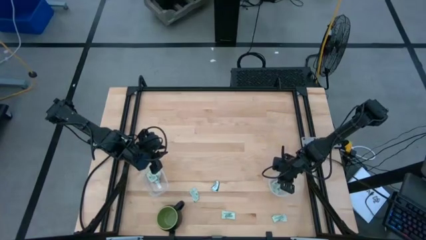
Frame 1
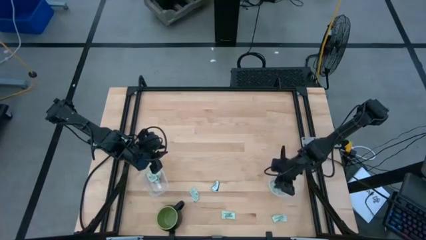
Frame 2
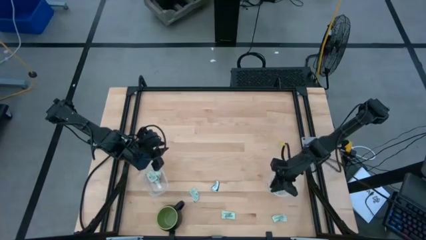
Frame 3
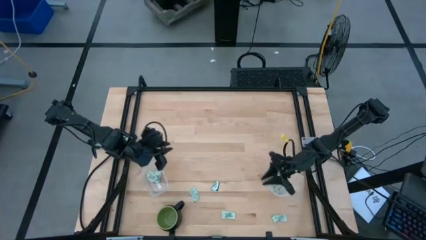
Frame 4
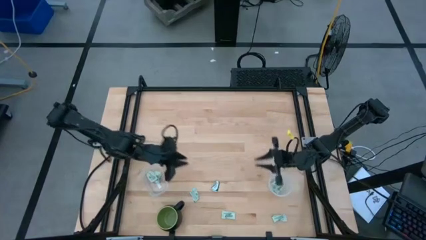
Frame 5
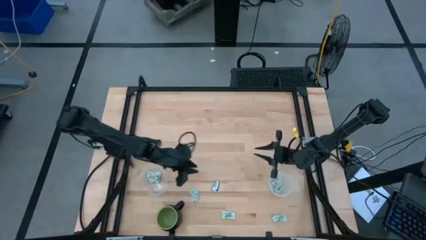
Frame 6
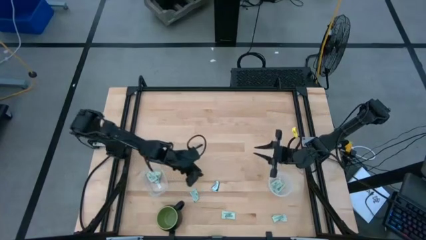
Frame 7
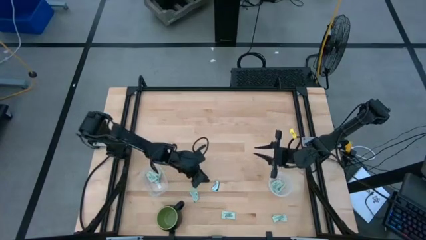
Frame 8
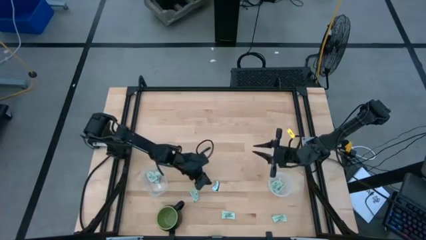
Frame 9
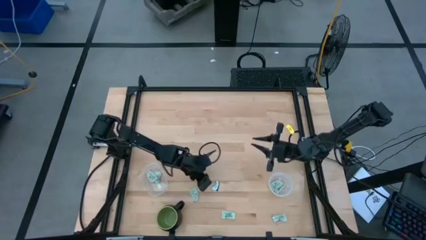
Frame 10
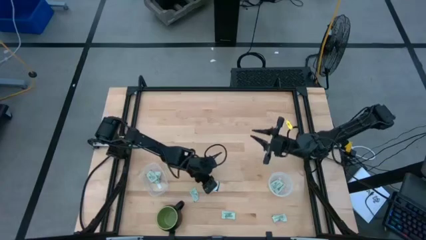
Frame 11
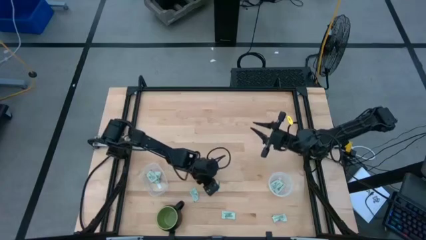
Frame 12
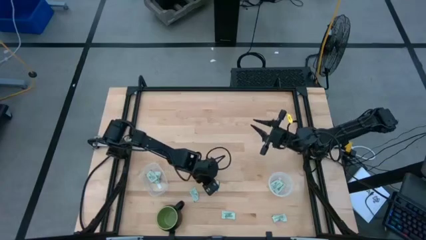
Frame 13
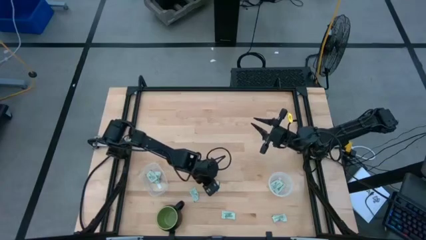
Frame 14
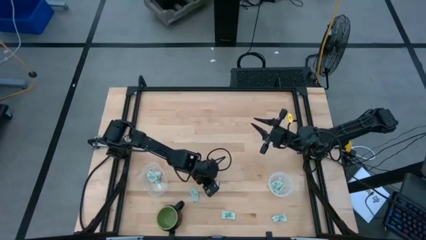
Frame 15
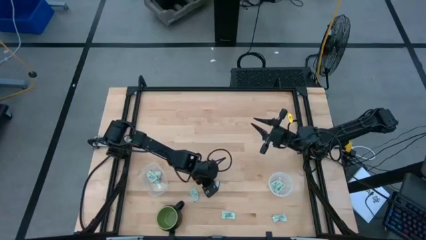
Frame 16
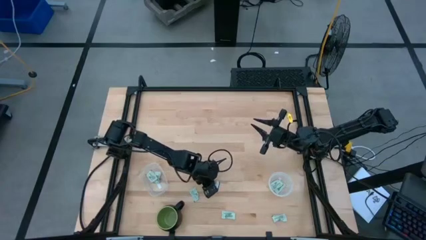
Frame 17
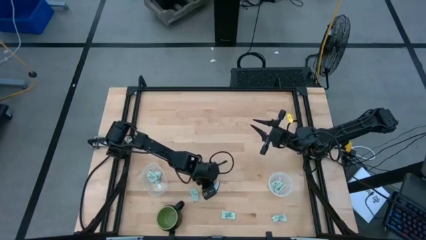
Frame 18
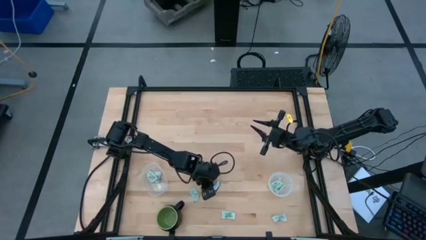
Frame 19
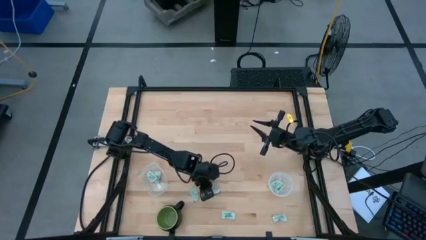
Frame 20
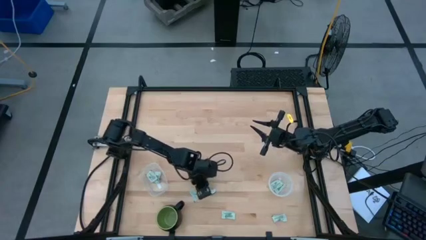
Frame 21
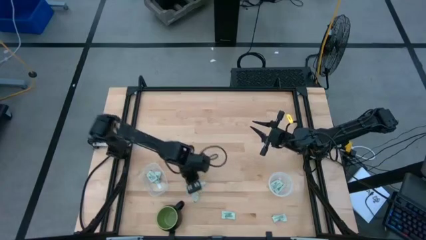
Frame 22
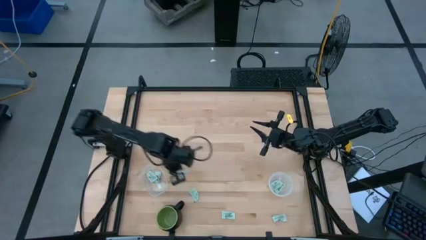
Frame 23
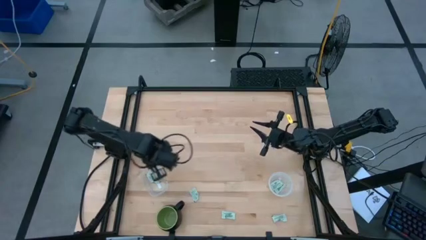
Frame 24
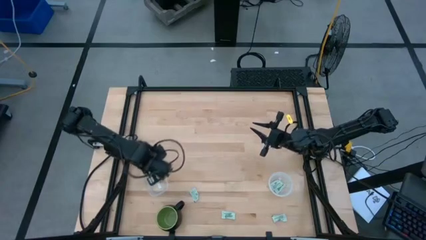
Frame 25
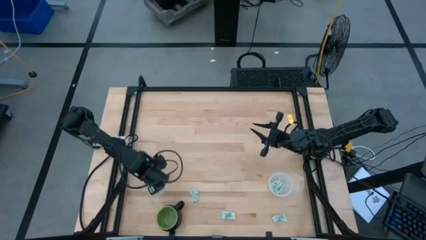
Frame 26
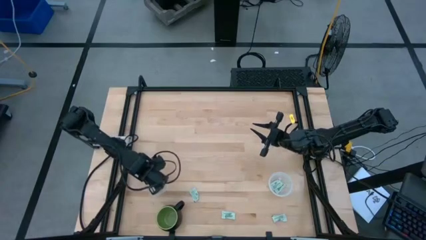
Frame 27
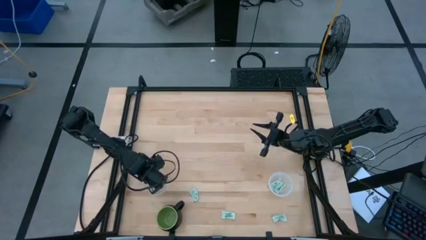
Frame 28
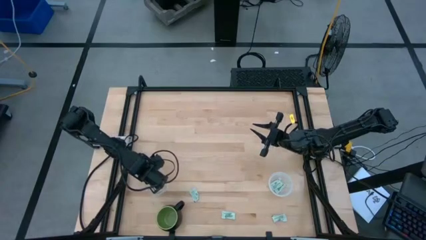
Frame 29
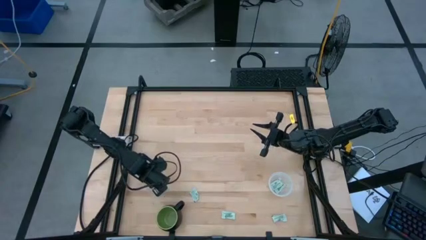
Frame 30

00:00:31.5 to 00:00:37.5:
Task: Pick and place items into bin
Put the green truvia packet into the left transparent bin

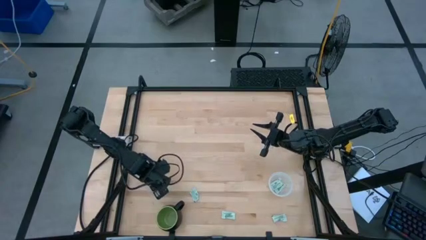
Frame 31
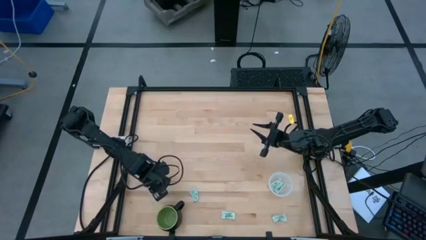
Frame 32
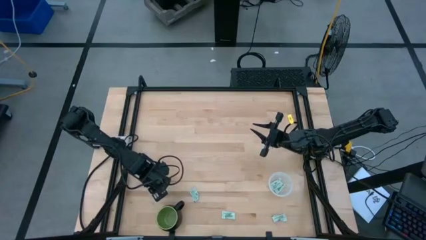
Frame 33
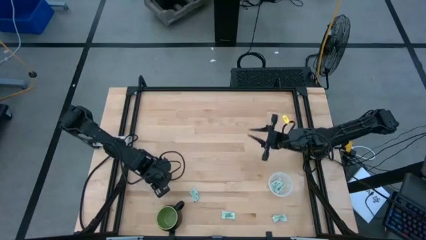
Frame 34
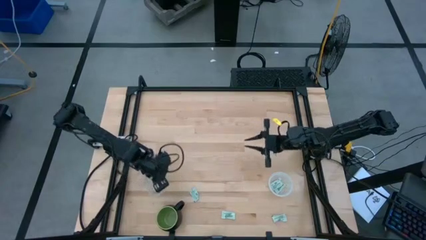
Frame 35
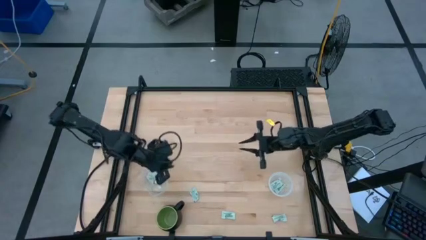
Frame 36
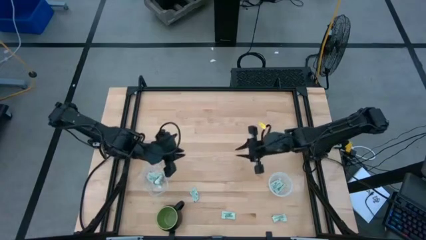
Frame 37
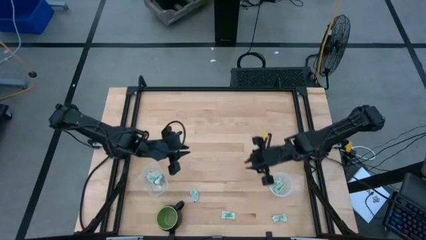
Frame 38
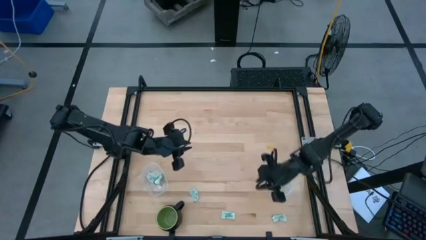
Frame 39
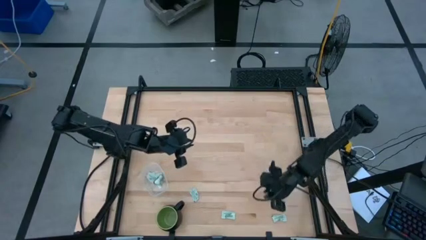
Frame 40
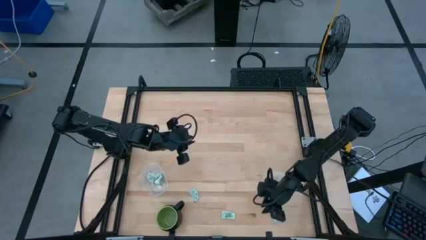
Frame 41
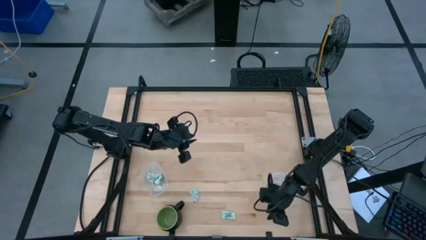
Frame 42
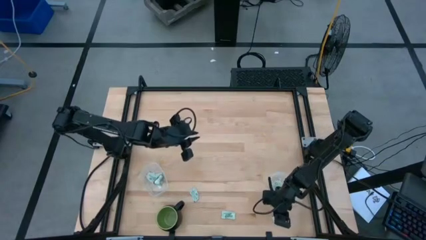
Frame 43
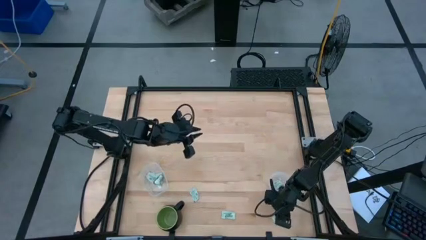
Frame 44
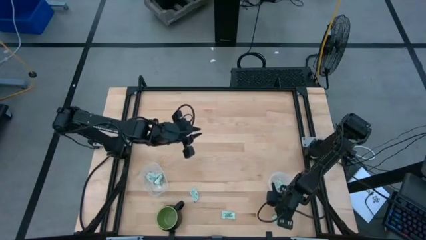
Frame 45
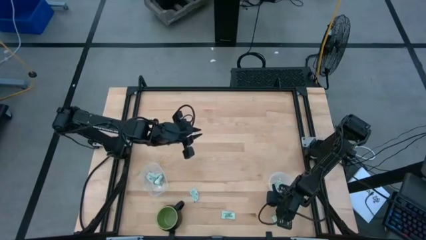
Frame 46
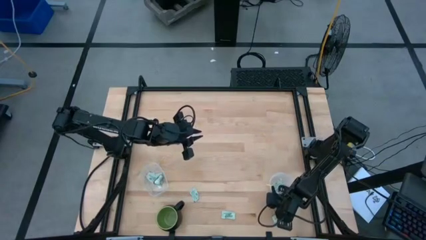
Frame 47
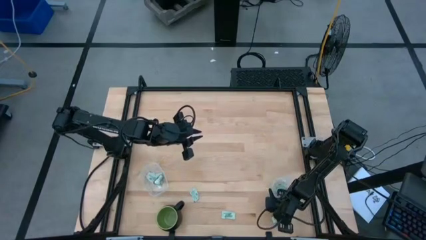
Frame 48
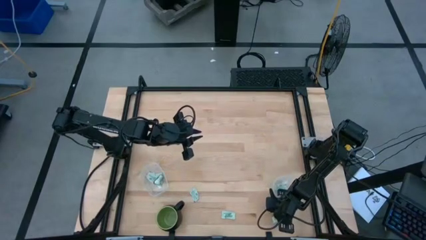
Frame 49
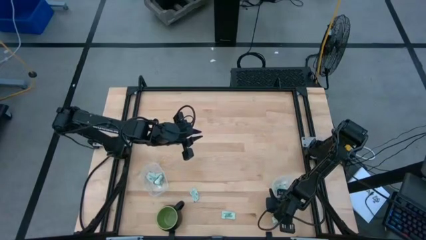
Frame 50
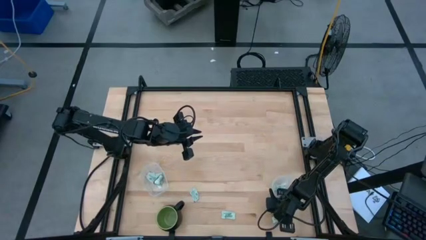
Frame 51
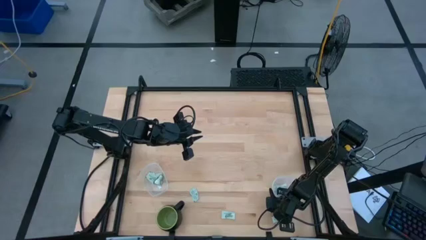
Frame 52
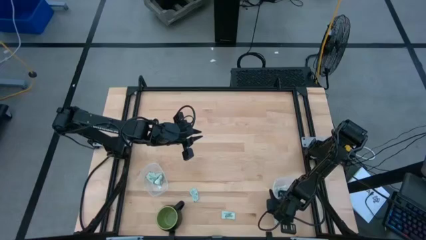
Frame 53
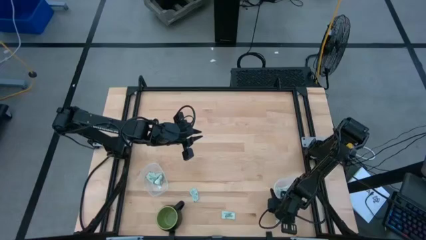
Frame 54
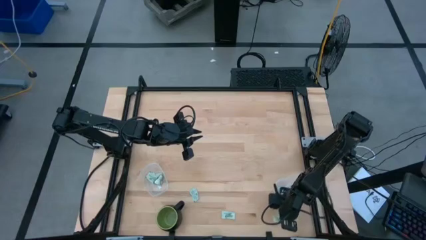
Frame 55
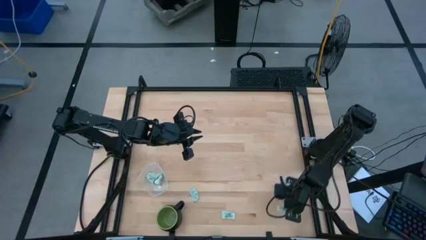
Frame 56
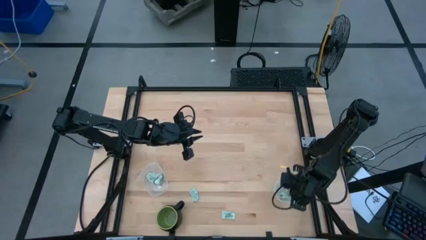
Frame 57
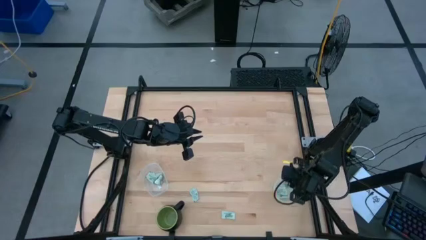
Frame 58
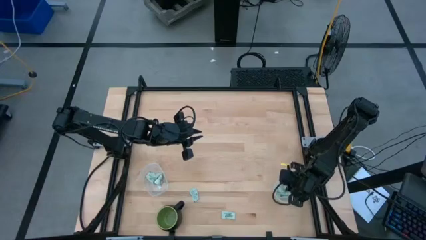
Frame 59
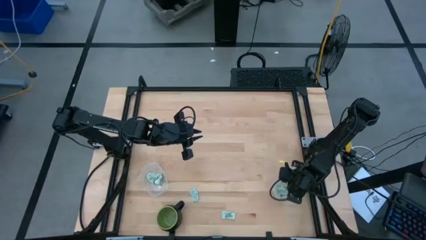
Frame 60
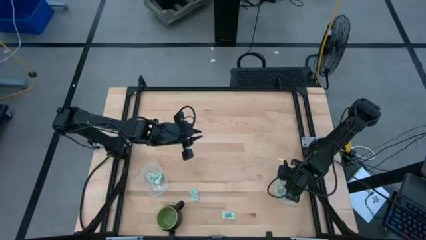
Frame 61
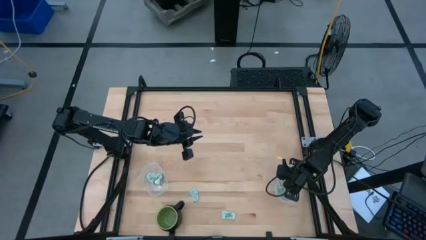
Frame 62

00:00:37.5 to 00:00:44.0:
Put the green stevia packet into the right transparent bin

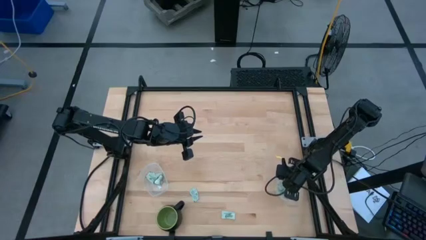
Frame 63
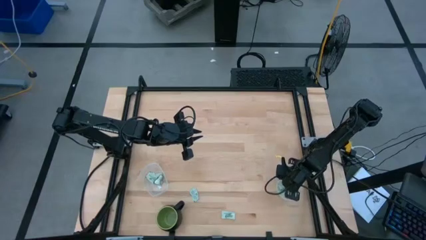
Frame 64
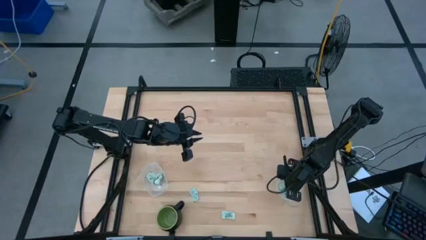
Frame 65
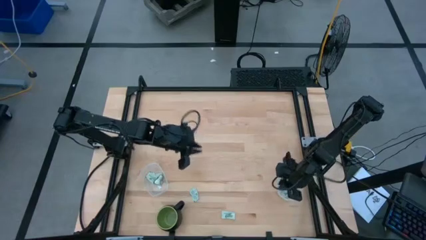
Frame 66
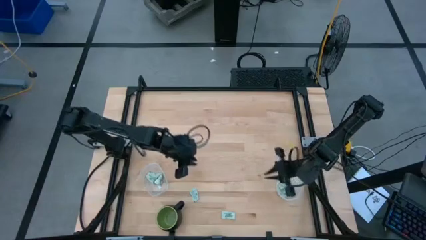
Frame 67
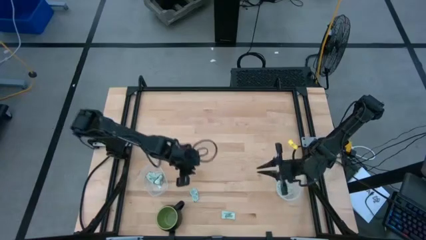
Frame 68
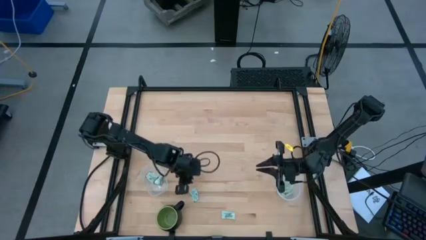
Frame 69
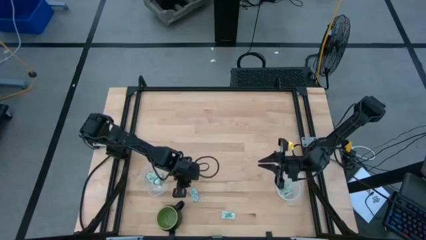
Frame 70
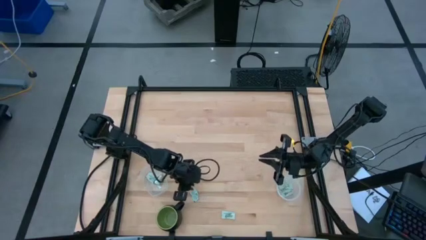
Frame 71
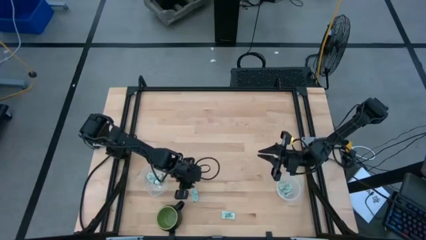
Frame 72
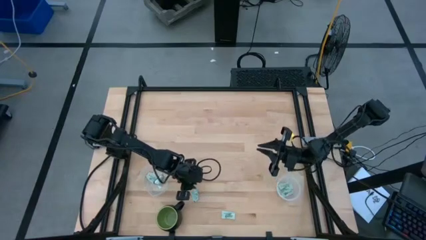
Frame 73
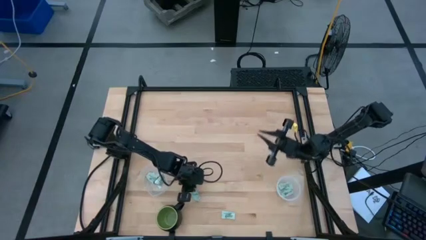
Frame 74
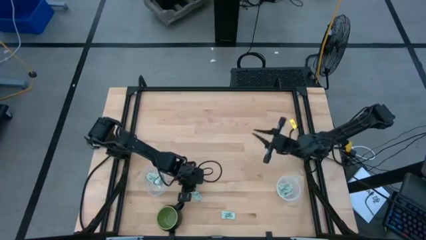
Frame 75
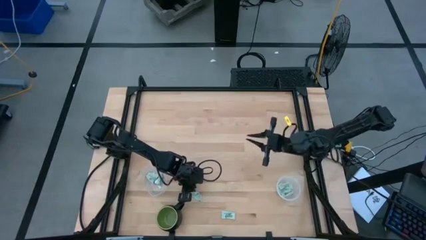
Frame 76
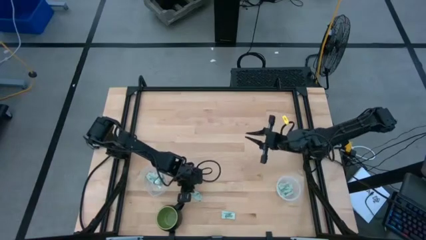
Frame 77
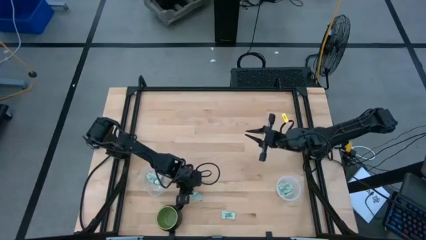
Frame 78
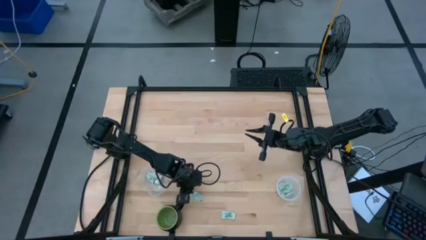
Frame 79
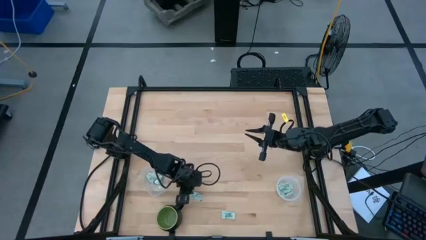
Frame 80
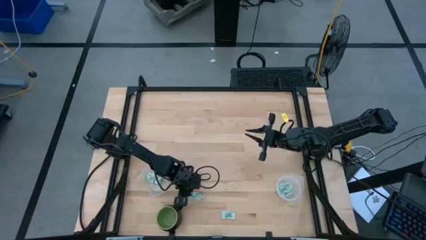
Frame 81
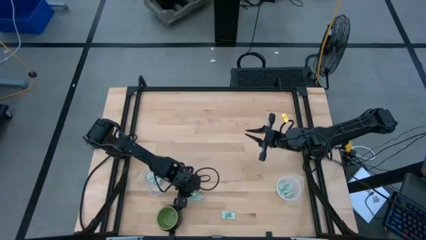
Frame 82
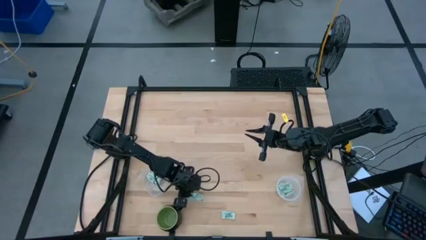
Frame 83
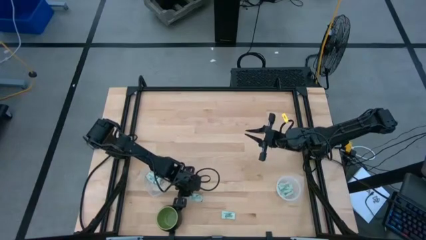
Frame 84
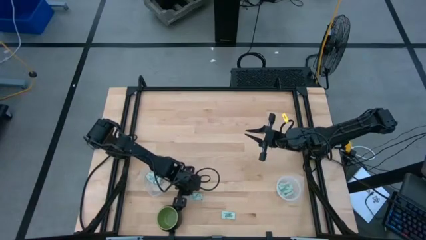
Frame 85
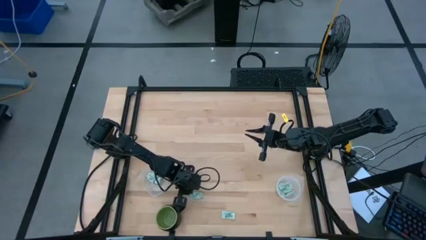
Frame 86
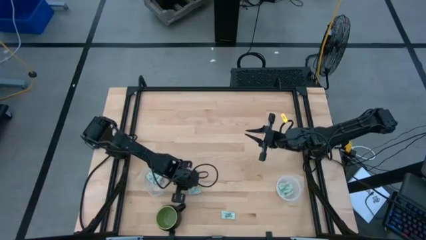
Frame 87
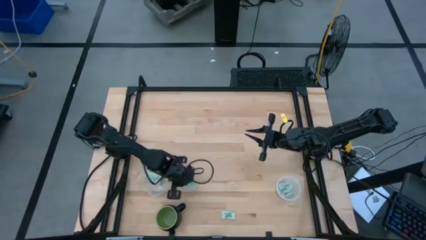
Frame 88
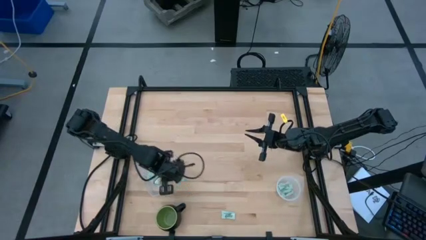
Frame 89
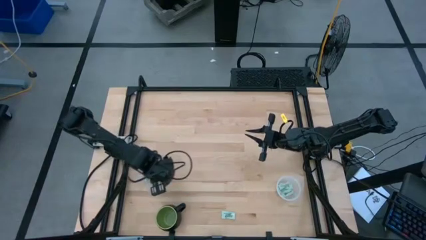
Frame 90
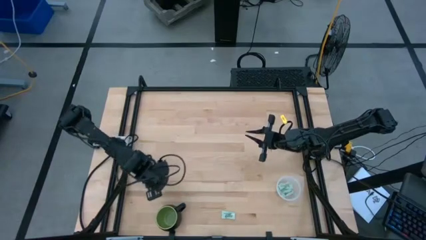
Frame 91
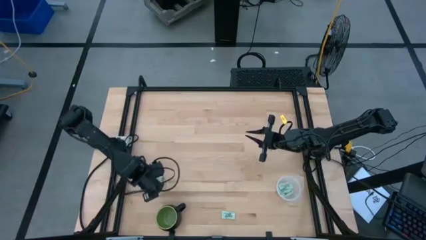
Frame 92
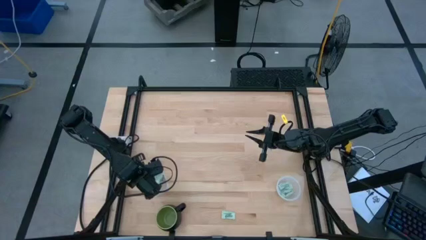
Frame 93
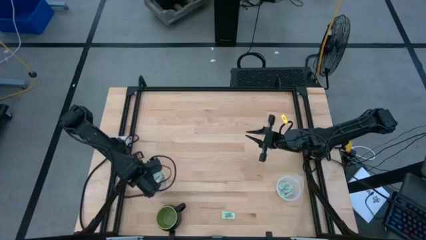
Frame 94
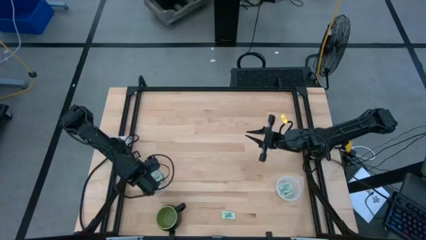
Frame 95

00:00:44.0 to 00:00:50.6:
Put the green stevia packet into the left transparent bin
